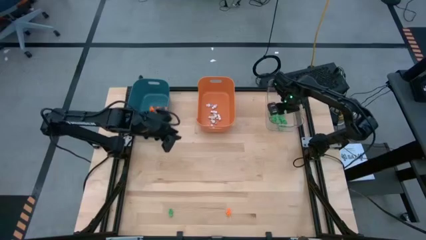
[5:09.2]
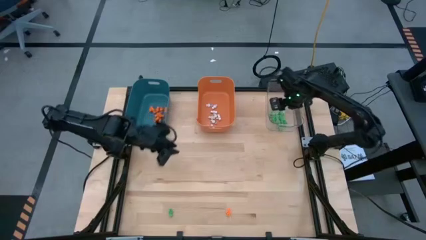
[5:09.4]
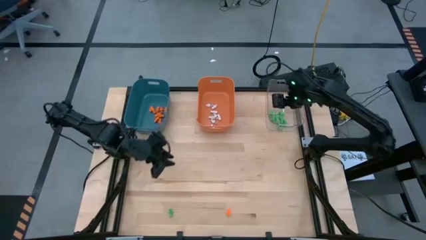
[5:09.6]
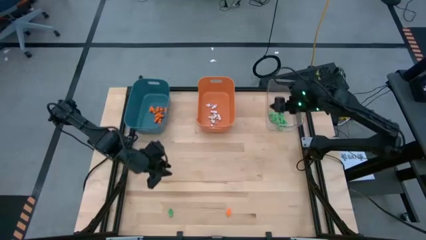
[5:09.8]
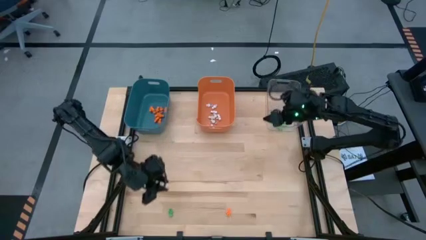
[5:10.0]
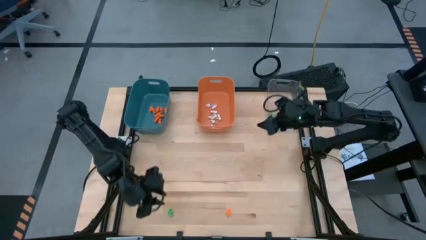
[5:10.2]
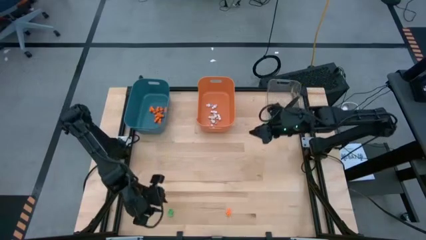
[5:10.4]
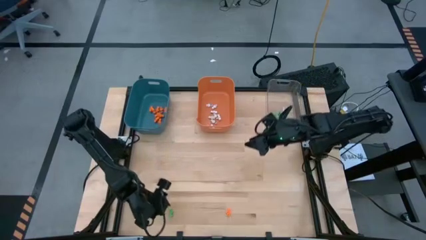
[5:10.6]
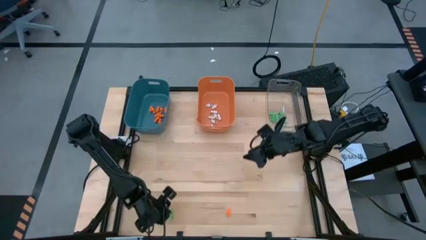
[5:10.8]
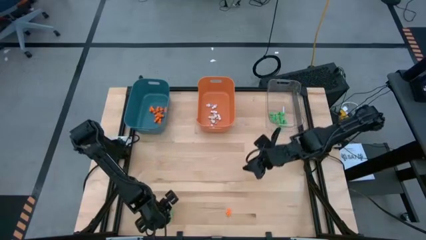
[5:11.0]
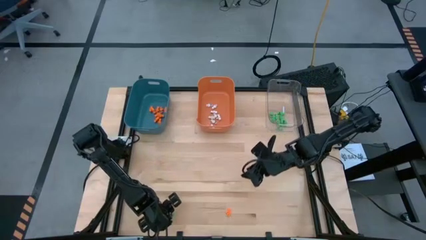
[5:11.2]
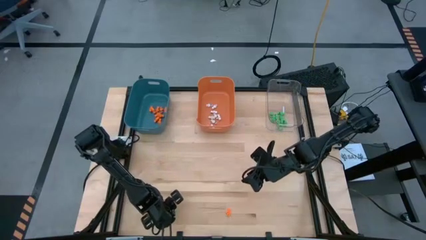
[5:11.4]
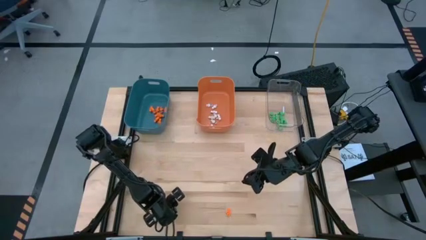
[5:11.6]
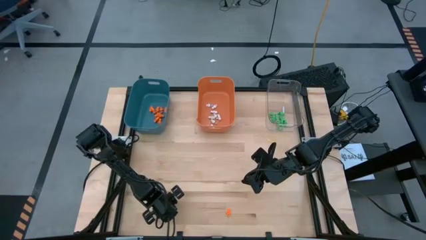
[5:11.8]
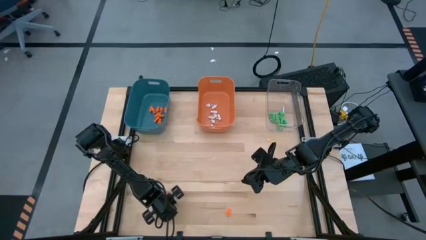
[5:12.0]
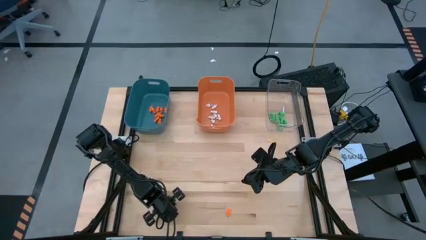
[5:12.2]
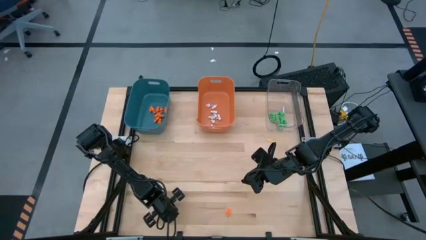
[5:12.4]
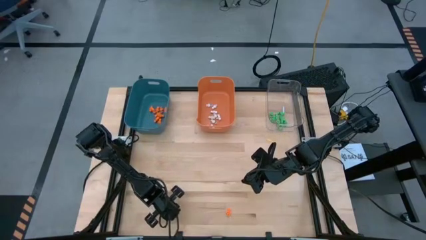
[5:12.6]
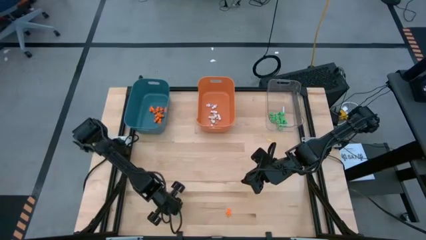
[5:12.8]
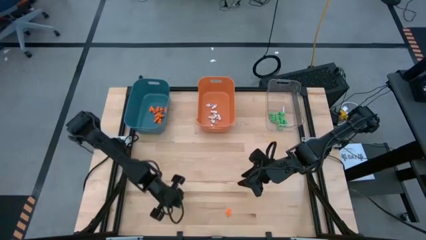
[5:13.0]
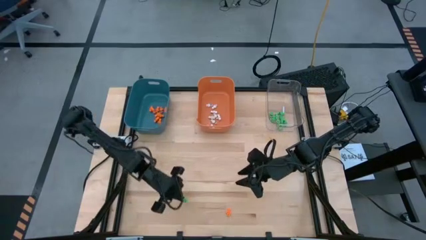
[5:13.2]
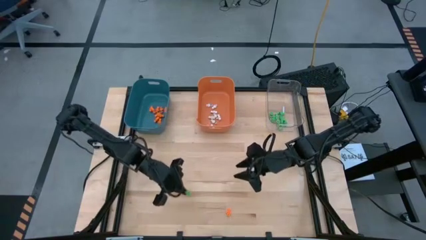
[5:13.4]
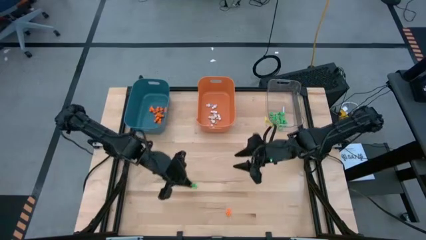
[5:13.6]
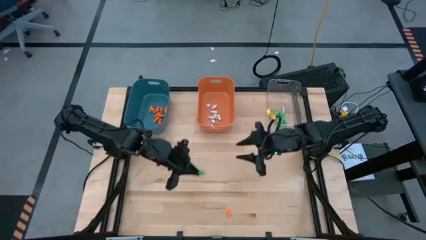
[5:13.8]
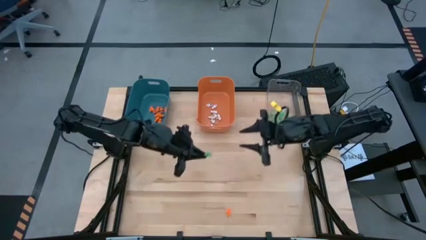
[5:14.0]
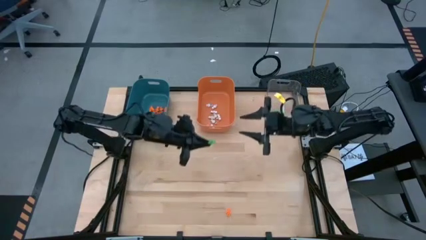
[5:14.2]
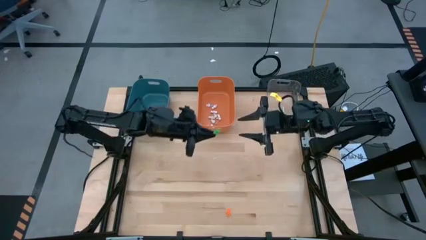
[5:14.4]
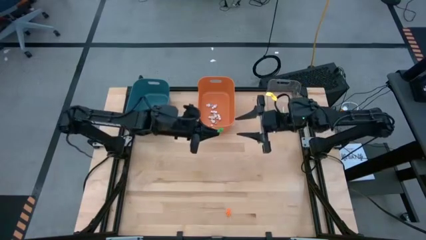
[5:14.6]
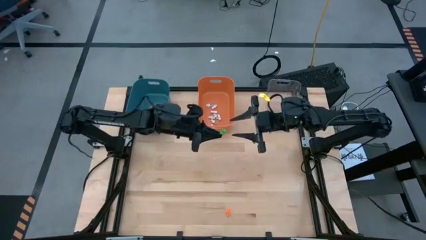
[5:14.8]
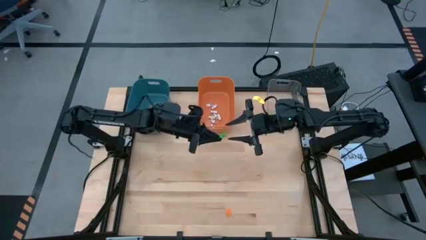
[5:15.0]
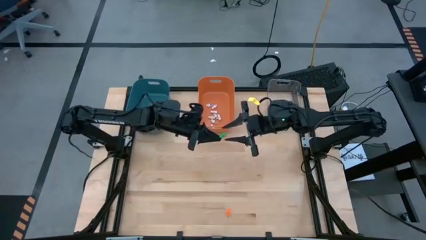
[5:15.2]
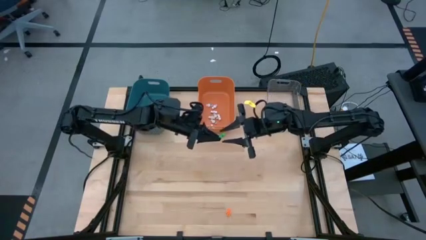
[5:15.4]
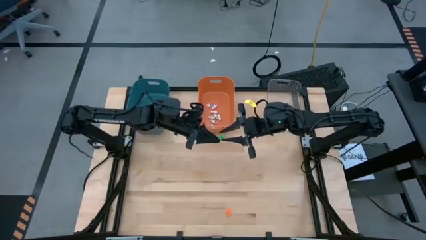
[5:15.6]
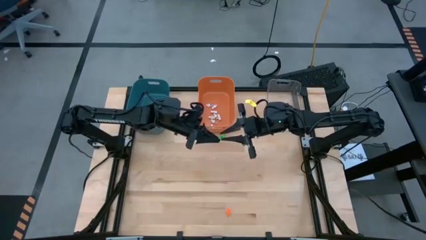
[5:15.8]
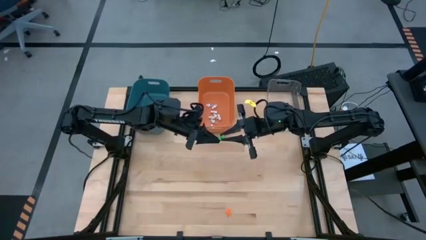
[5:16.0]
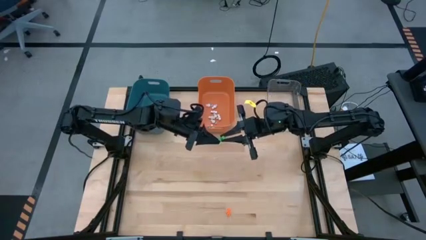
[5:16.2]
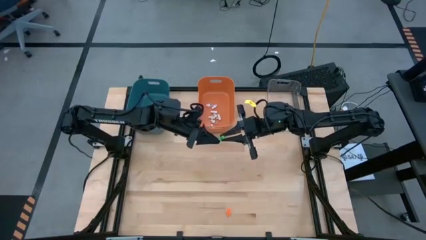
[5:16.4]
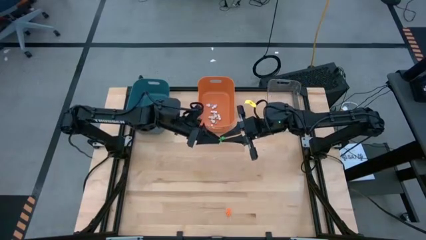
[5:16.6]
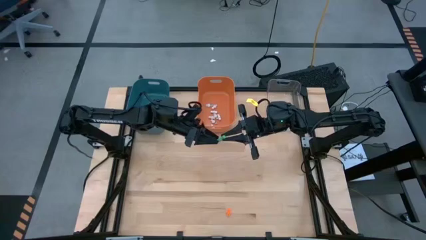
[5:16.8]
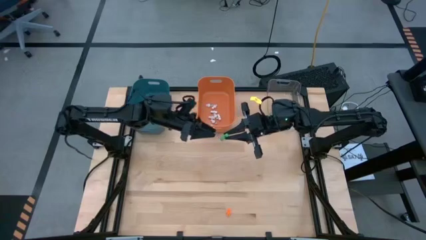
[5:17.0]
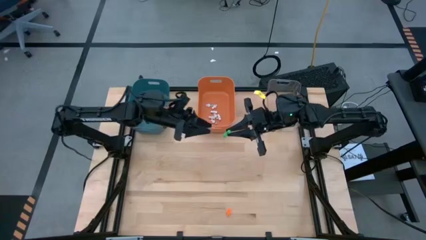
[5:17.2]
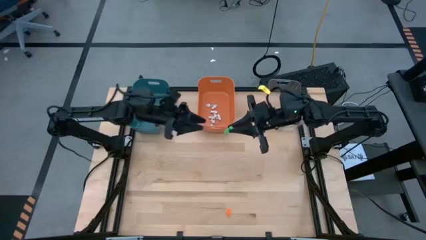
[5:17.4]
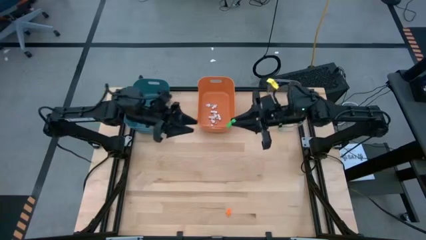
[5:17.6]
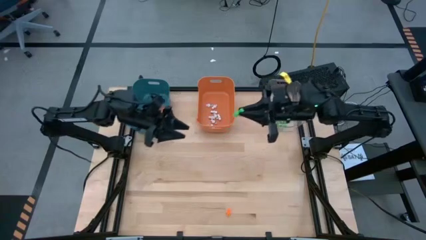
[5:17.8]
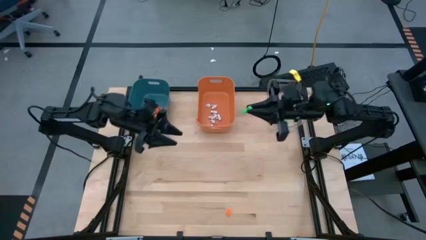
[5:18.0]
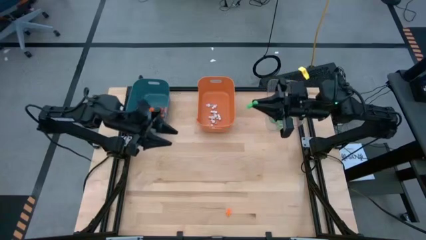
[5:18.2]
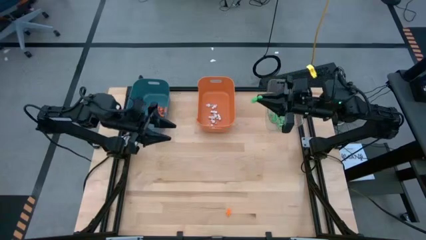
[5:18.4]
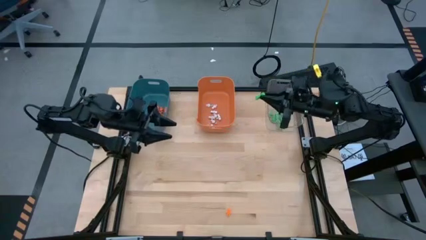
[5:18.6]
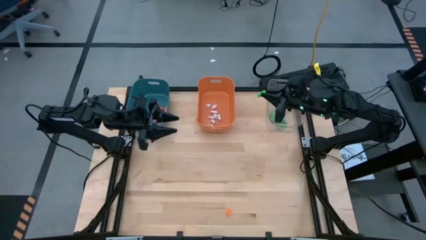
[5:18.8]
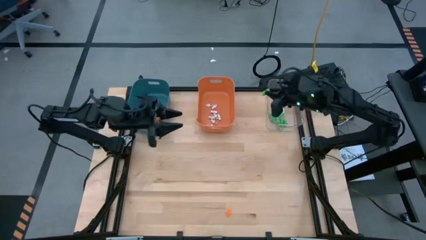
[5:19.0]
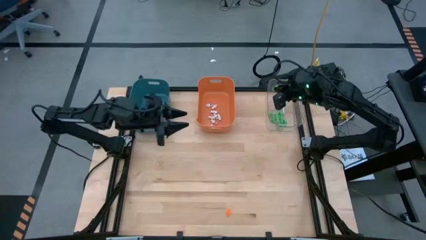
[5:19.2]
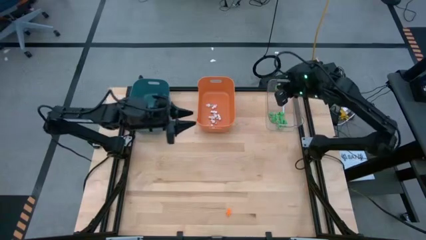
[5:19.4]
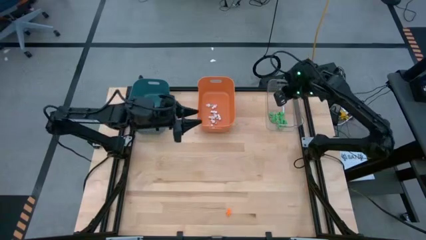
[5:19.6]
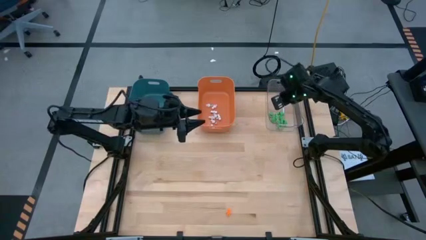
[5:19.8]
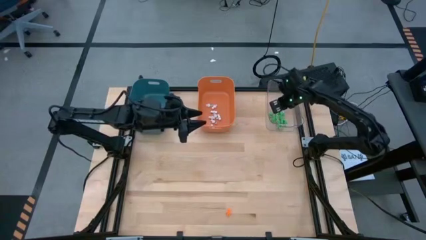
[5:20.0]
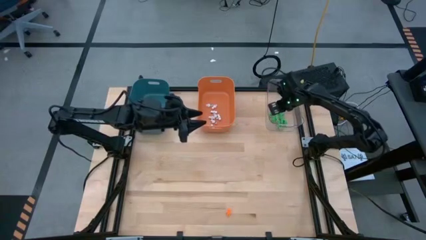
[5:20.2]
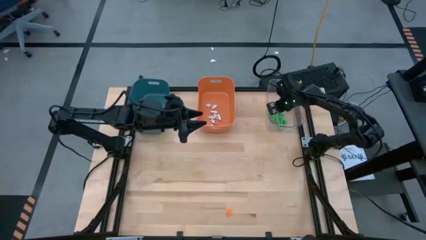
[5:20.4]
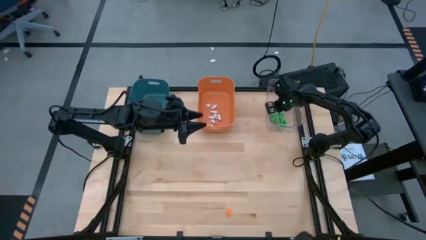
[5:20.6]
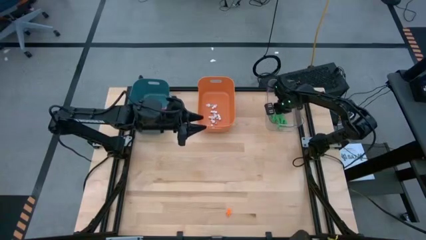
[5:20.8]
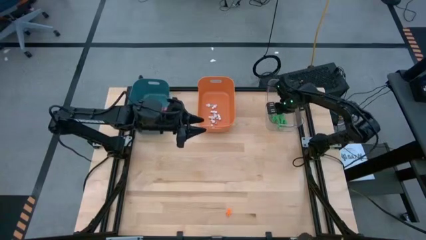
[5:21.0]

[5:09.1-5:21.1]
Task: Sort Halloween decoration
Put the green skeleton toy into the transparent bin

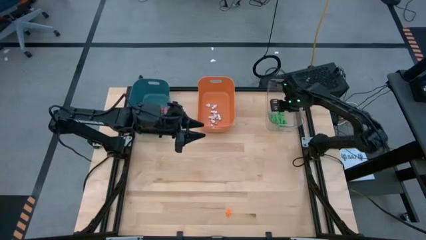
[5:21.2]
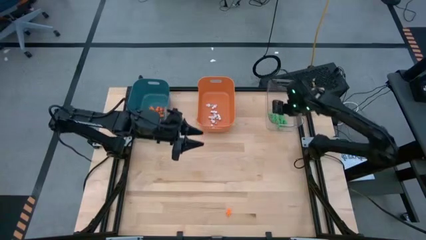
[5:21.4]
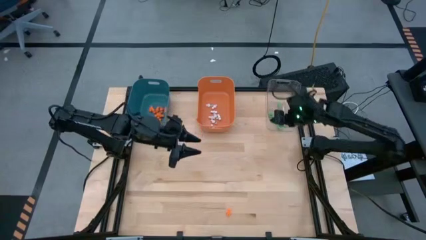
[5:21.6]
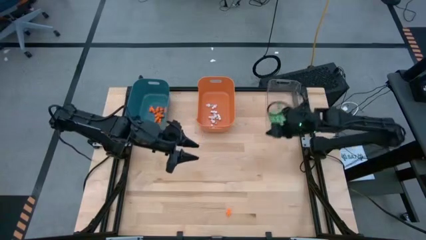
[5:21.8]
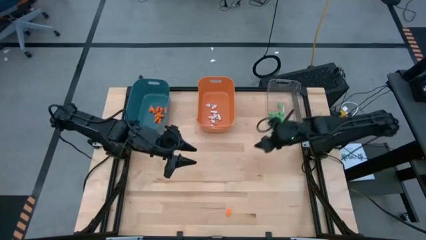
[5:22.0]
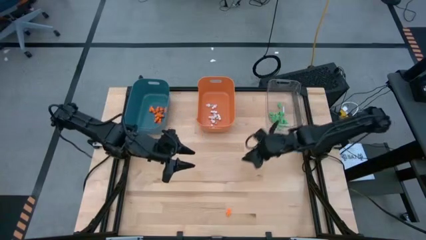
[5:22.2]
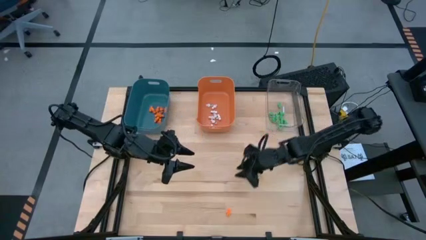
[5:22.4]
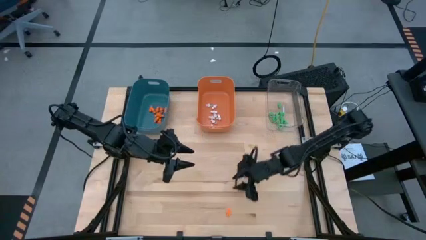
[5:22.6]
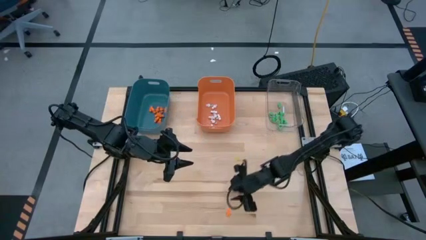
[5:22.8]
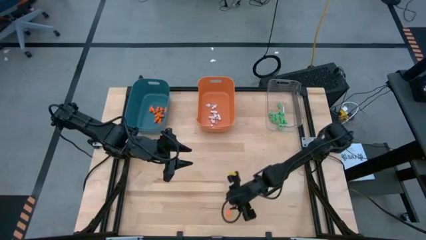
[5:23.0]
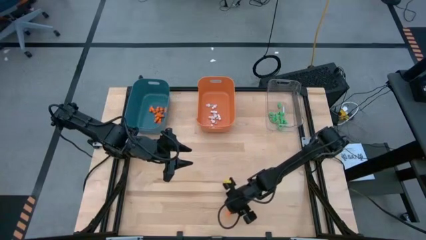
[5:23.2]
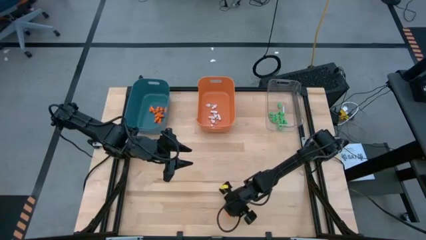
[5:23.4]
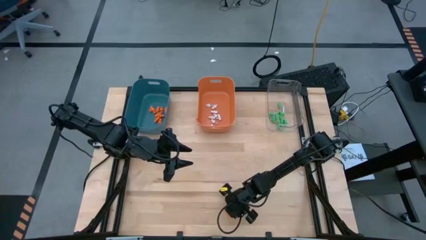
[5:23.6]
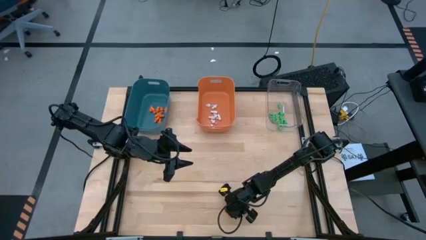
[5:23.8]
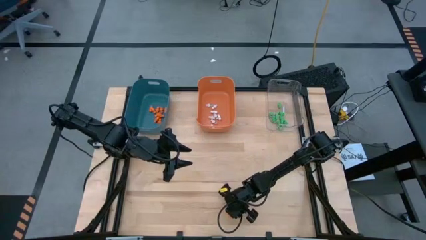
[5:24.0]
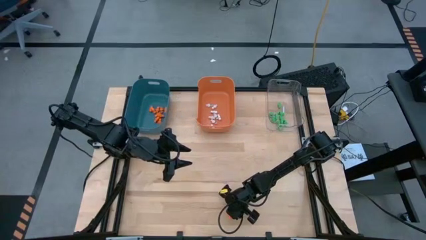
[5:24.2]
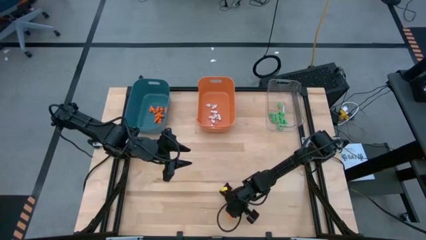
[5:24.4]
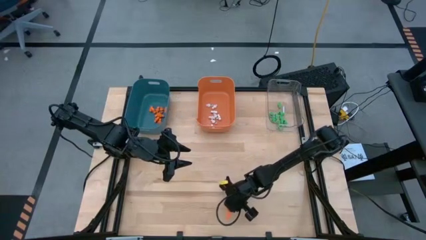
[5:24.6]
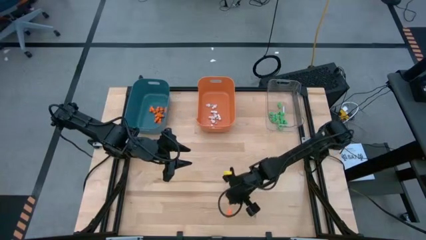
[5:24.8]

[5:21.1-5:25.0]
Put the orange skeleton toy into the blue bin
